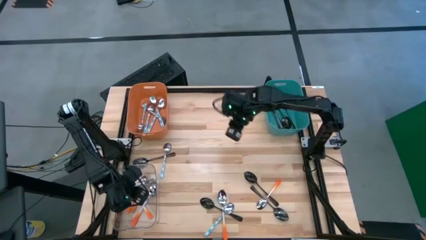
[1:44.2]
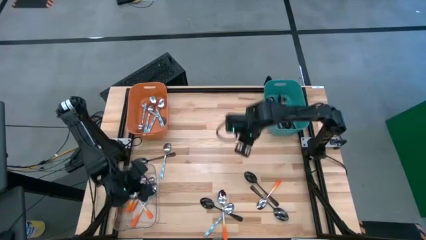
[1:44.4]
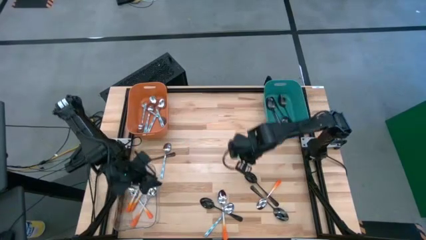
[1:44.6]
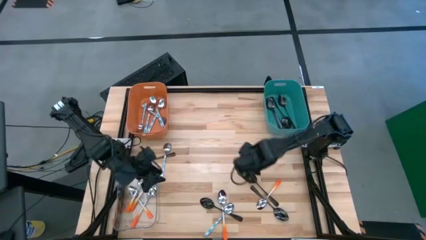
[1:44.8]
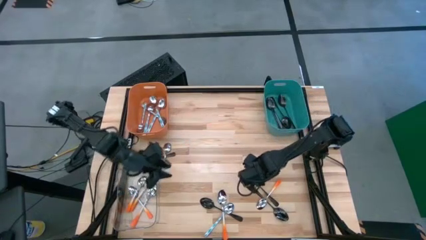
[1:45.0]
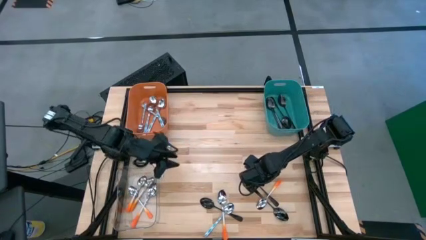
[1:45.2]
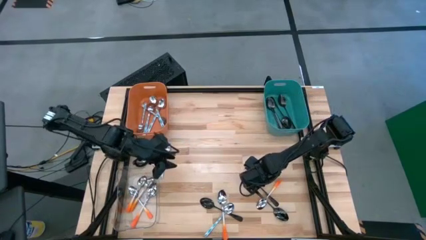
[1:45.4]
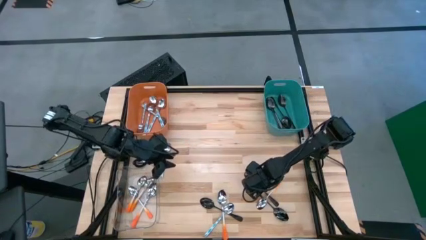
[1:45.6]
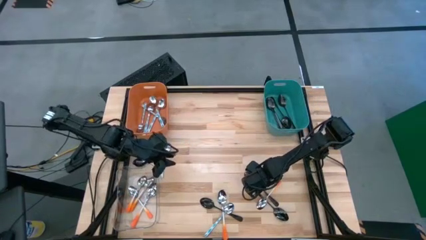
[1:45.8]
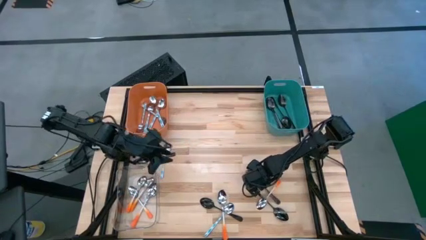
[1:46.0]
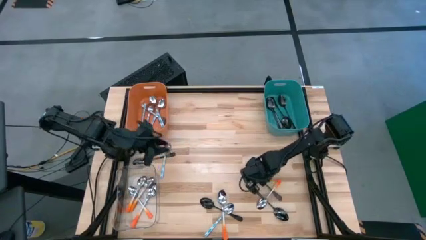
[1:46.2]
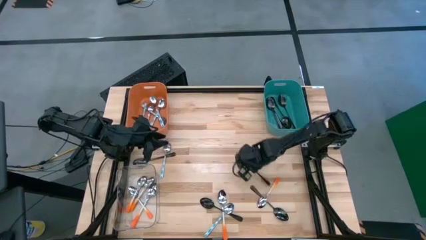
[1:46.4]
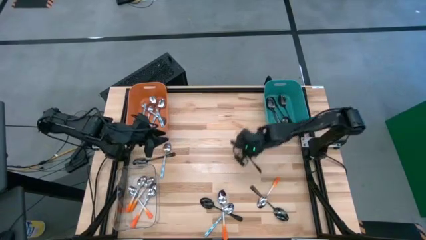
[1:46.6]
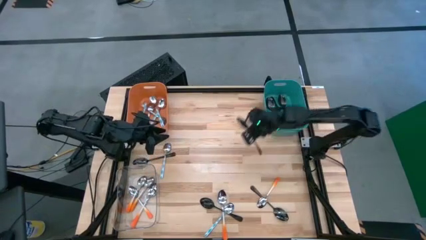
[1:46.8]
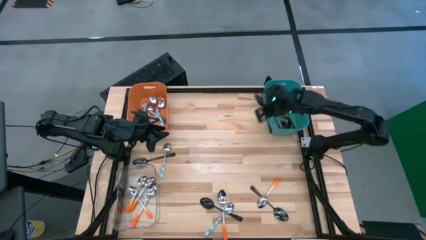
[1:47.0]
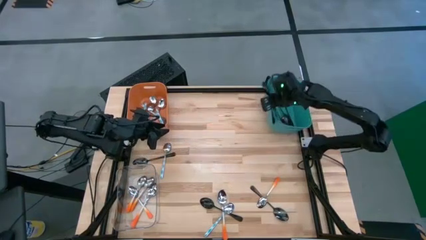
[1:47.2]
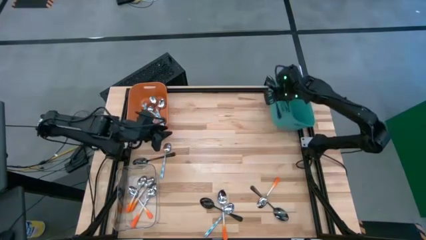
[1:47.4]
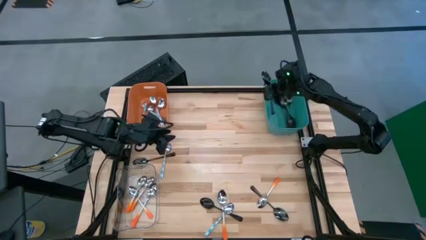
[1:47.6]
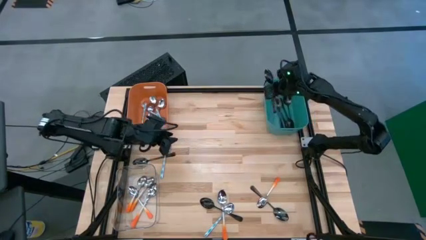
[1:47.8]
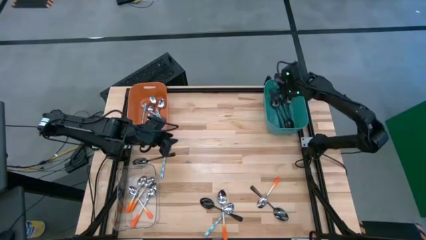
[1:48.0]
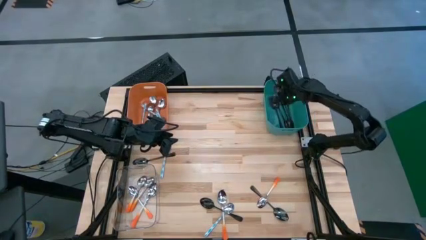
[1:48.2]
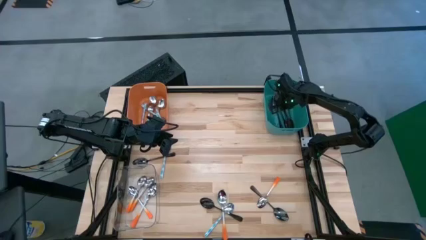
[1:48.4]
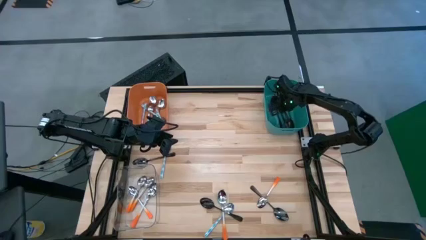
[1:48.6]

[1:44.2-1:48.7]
Task: Sort silverware by color (type)
Put the black spoon into the white blue bin

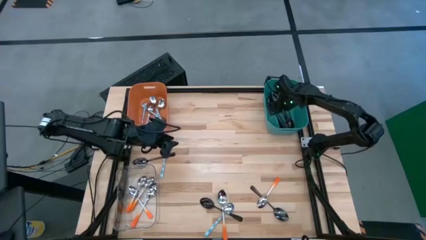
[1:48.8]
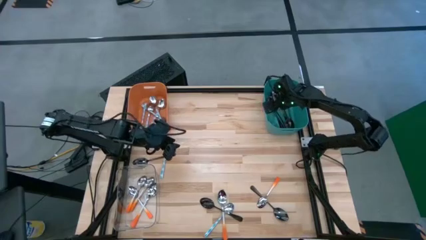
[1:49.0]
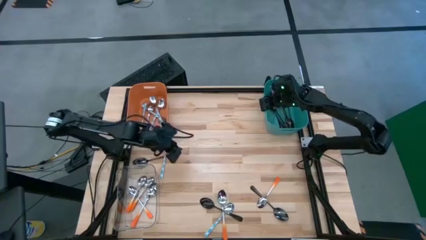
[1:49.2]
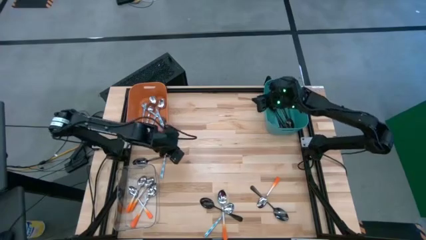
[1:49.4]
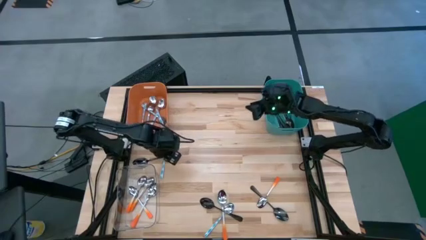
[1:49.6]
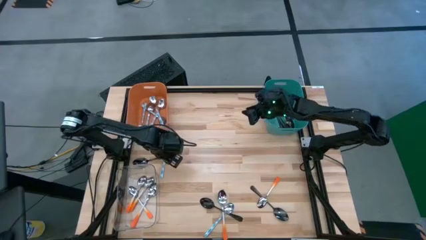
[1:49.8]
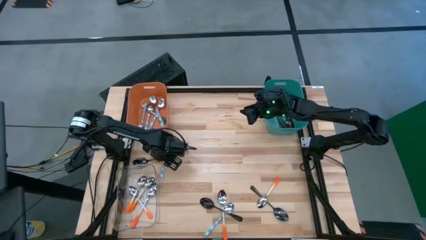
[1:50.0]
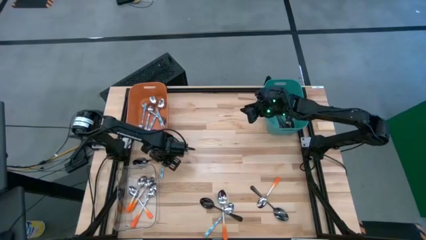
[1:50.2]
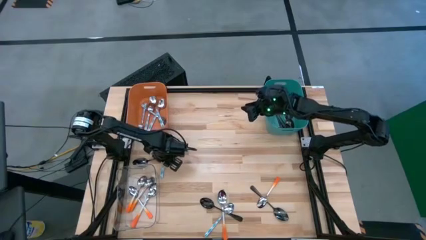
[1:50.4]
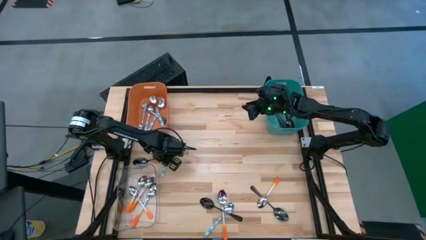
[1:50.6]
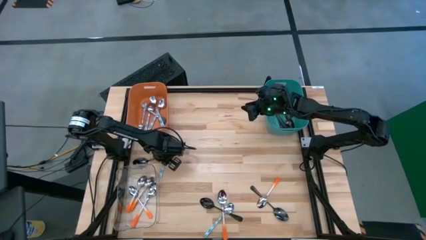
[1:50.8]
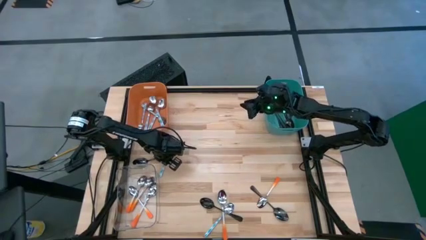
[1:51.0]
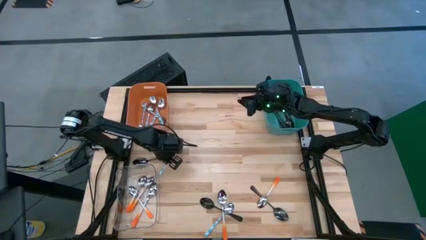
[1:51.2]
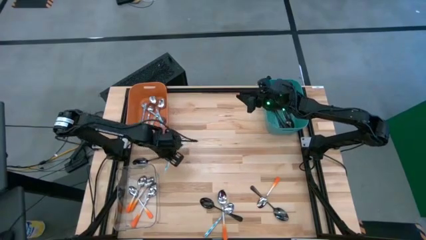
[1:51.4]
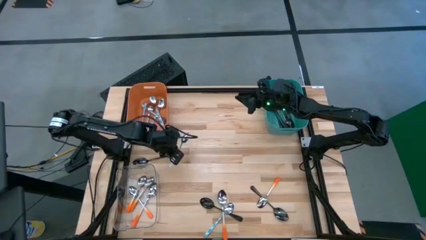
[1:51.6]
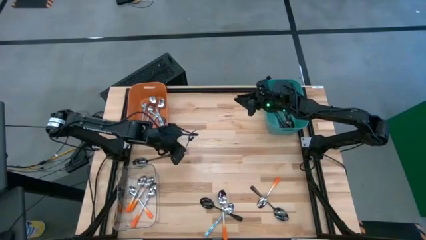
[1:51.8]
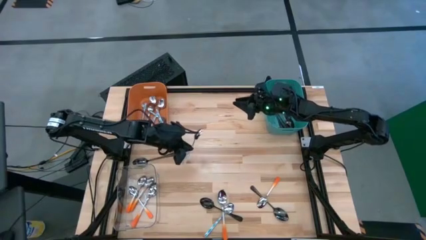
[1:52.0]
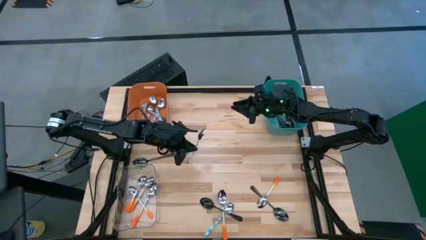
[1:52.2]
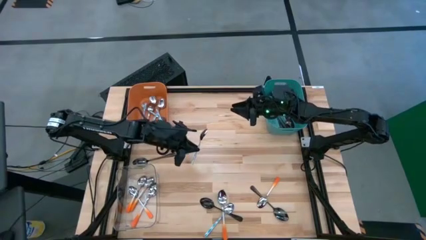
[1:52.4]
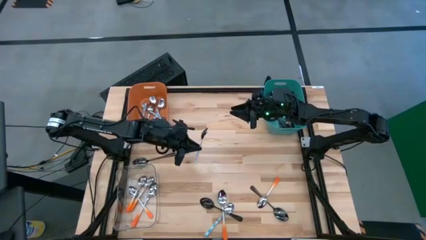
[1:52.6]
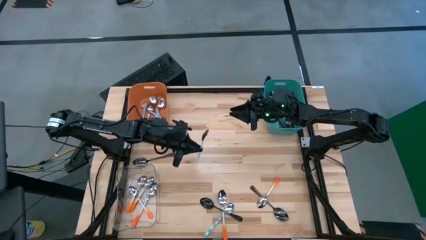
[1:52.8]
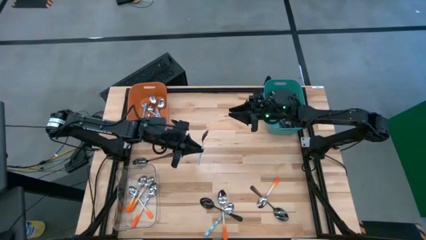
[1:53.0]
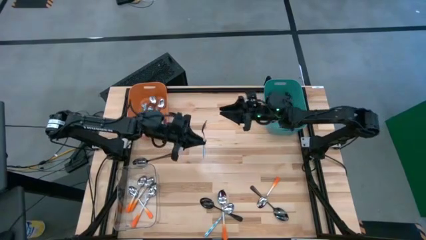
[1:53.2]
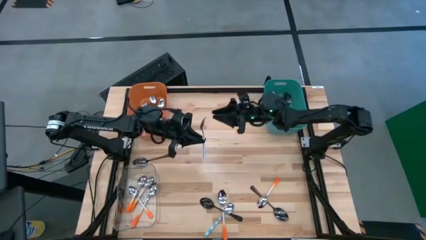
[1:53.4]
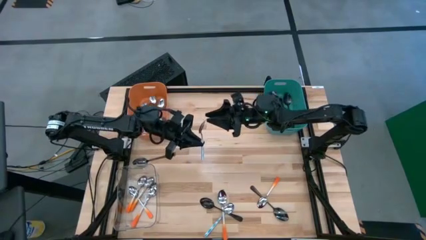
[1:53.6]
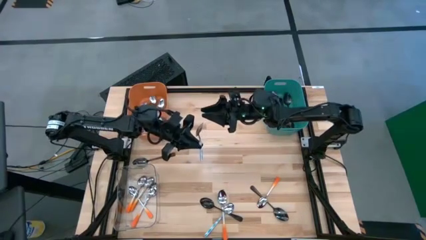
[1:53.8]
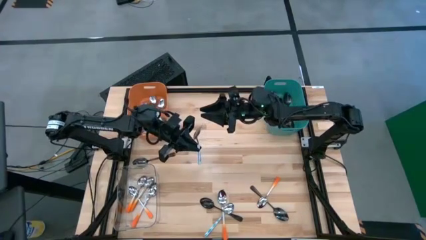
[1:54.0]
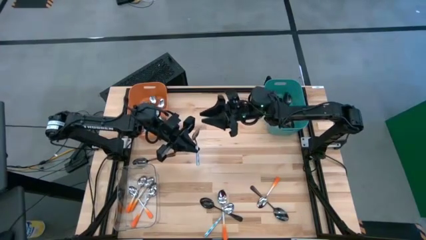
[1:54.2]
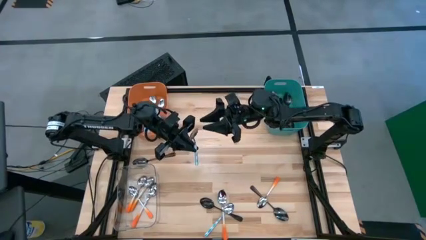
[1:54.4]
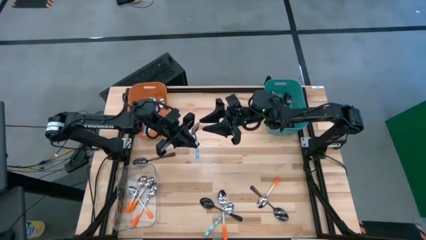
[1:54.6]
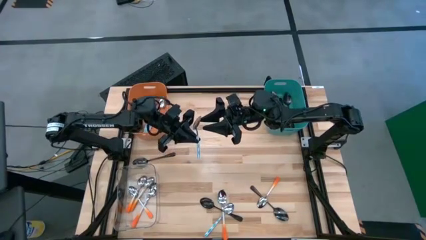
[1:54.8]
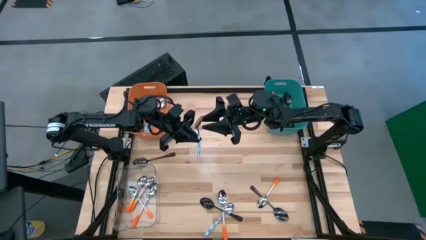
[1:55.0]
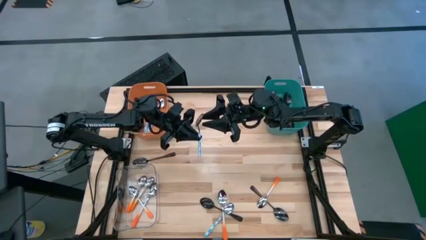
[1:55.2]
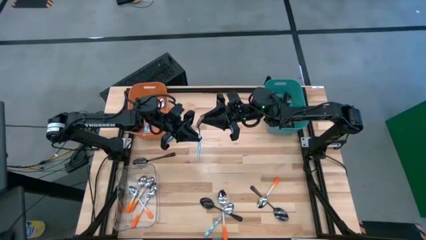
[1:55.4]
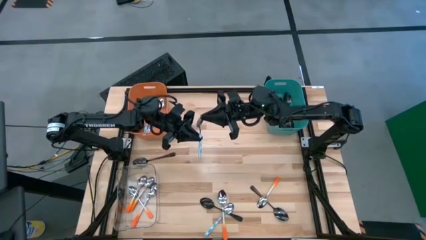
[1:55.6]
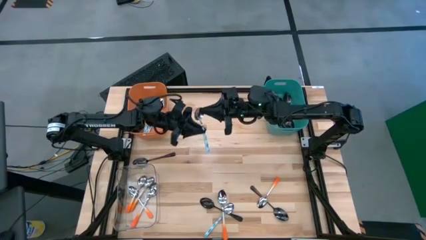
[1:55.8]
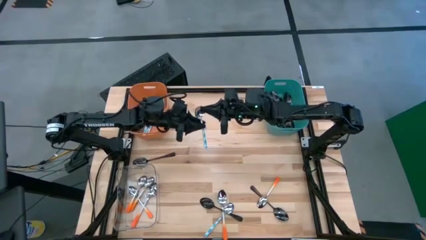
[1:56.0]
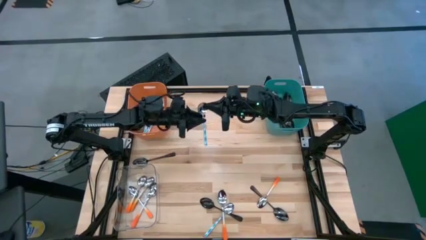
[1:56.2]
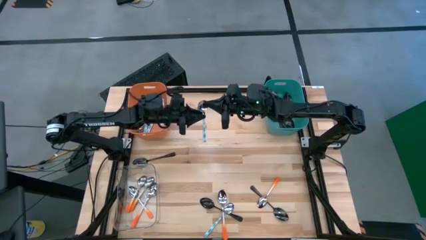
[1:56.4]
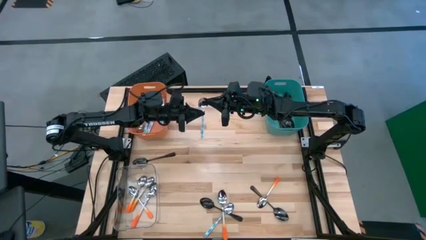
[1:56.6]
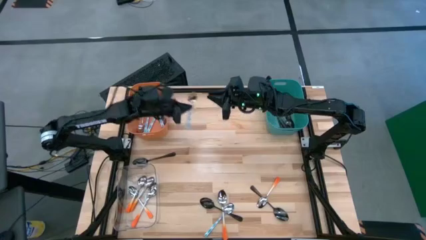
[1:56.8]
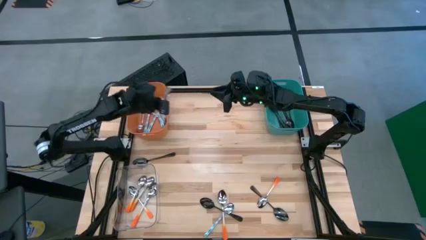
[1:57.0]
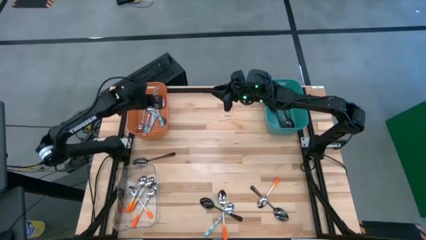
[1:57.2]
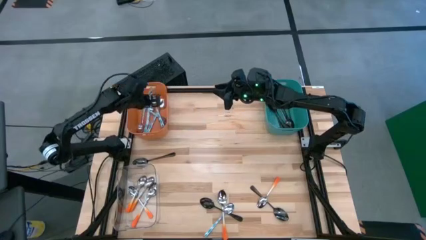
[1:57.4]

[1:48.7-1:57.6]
Put the white blue spoon into the orange bin
